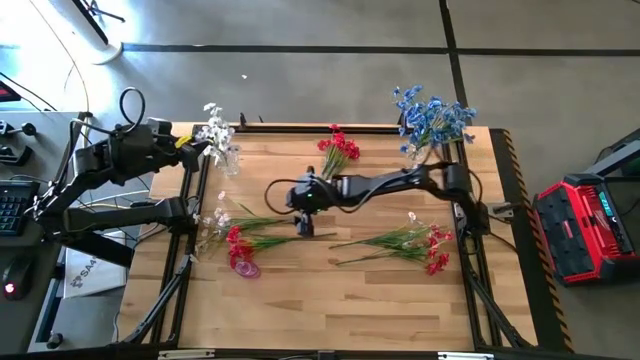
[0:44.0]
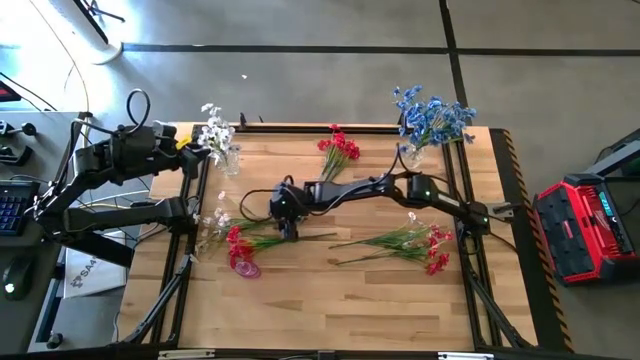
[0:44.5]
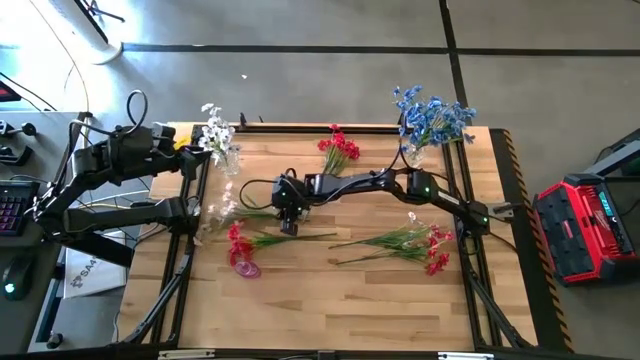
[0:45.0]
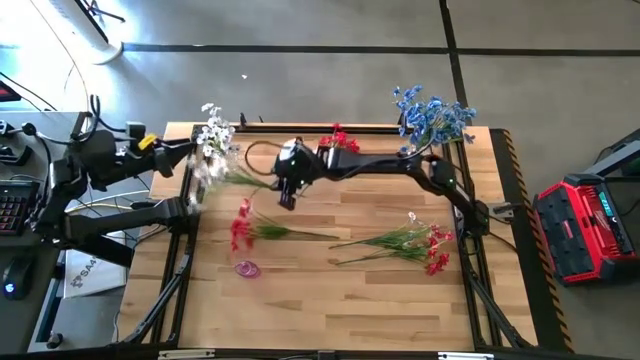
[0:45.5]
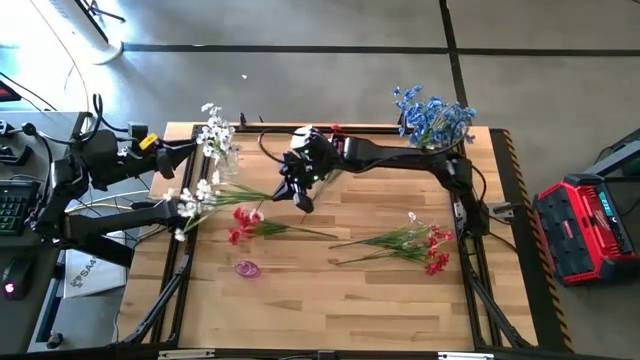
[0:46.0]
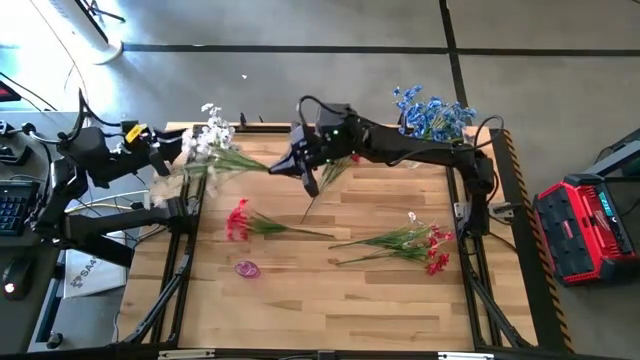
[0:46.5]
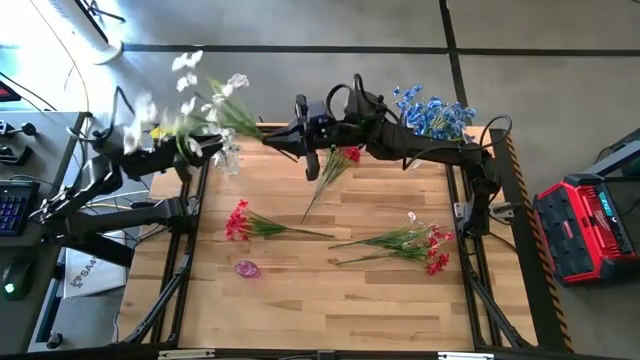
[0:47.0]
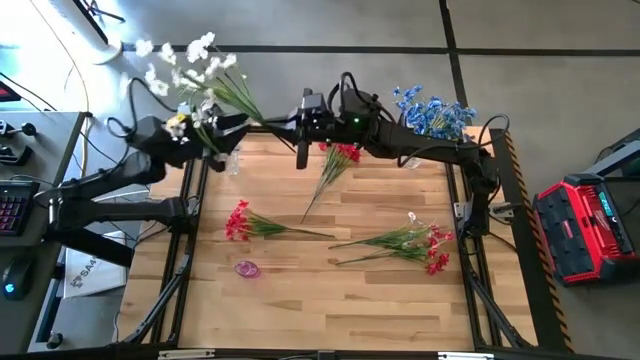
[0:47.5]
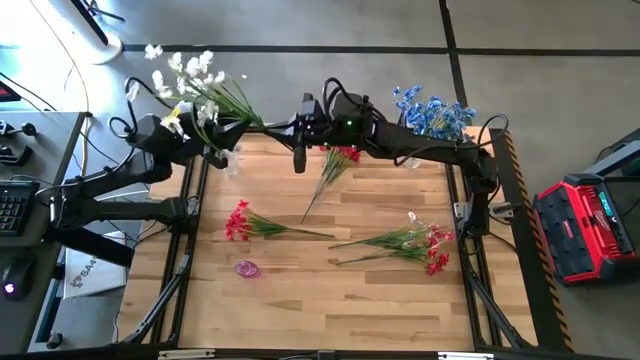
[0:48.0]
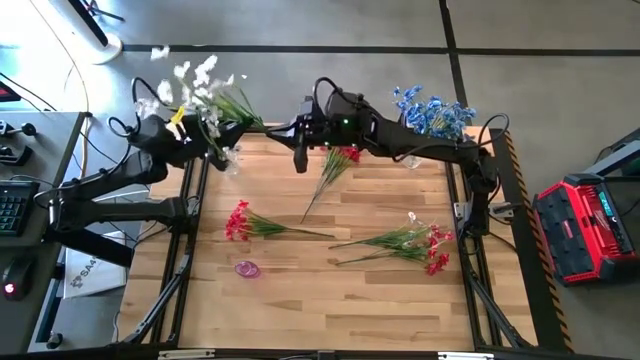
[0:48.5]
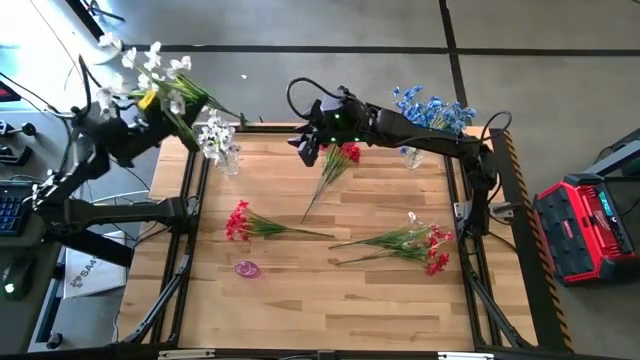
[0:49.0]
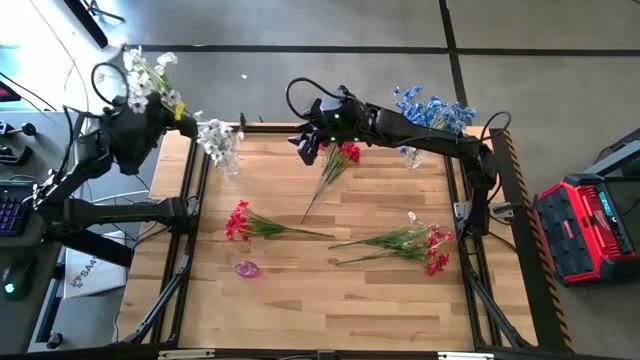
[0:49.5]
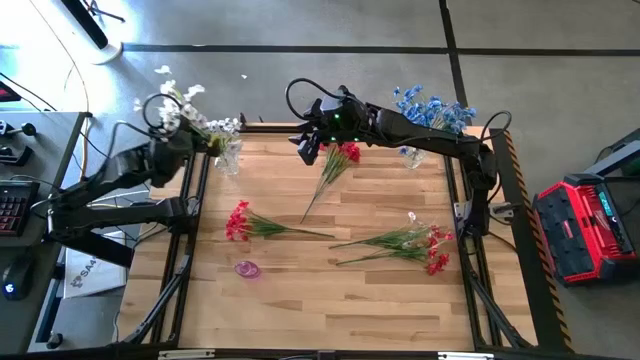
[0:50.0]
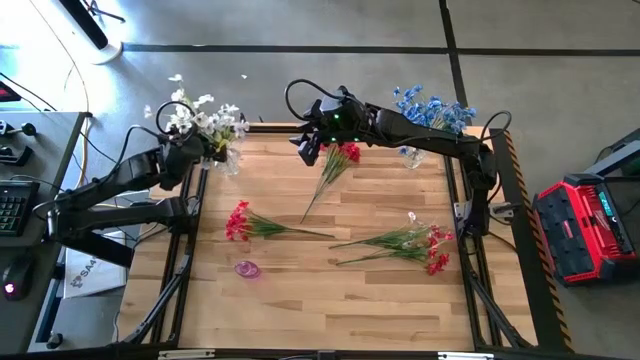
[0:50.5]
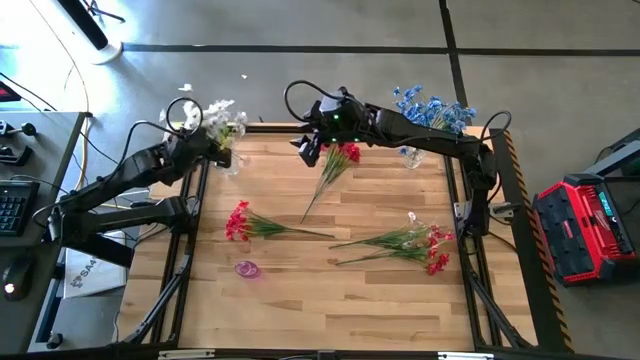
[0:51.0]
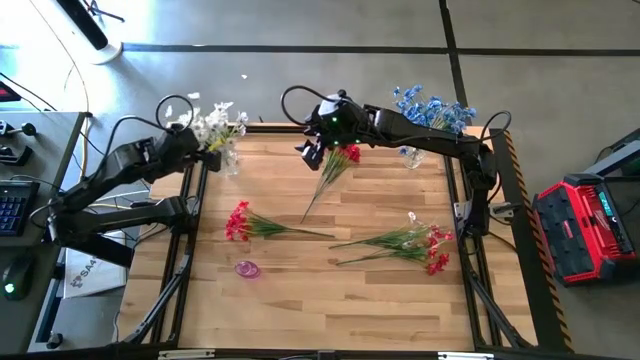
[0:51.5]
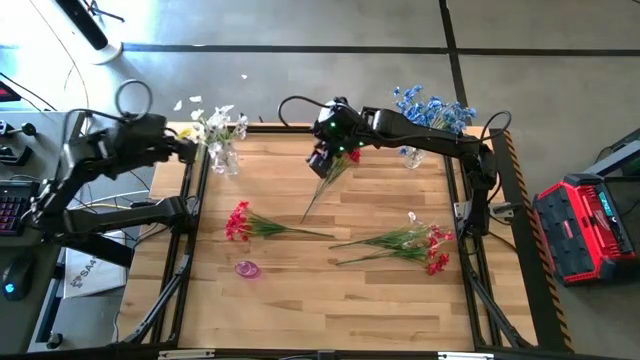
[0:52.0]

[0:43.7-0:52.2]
Task: Sort flowers into vase by color
Put the left white flowers into the left transparent vase

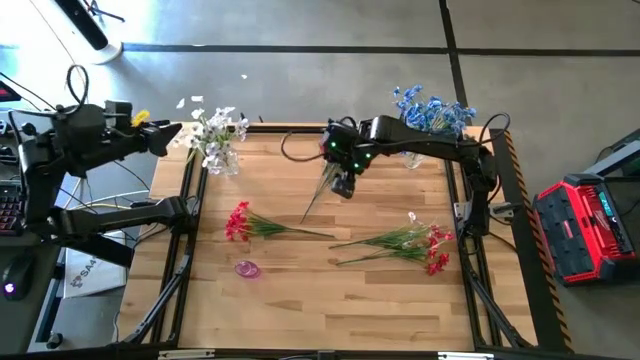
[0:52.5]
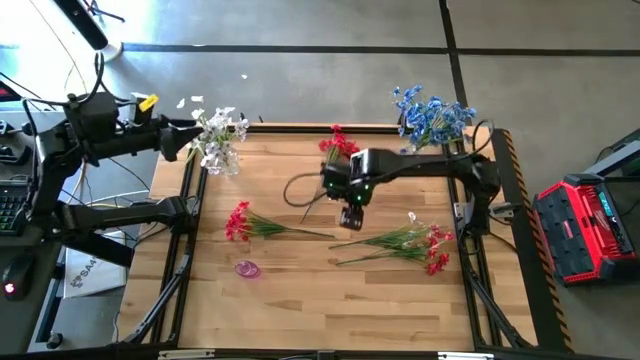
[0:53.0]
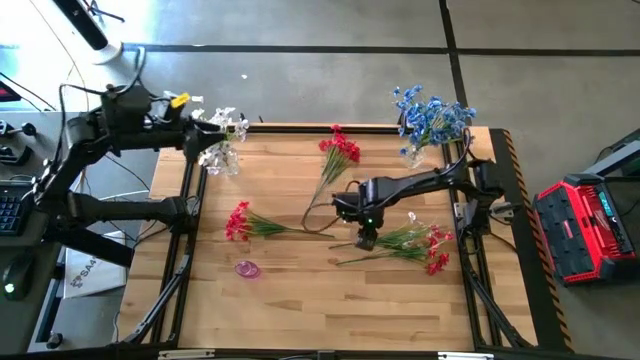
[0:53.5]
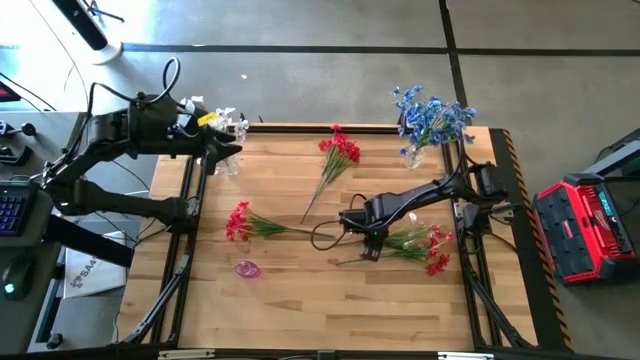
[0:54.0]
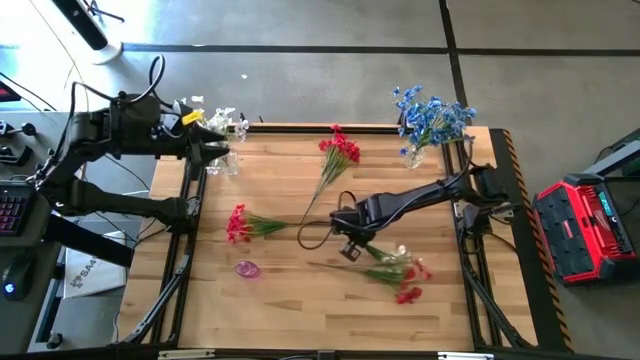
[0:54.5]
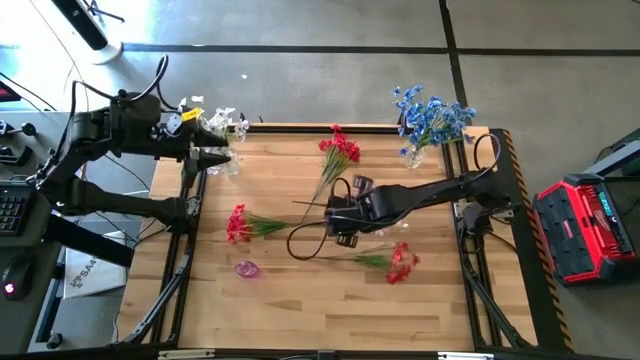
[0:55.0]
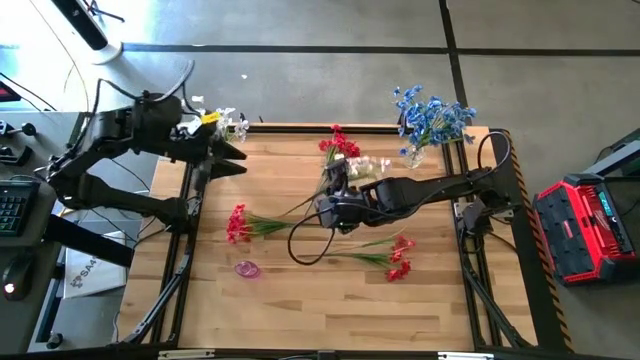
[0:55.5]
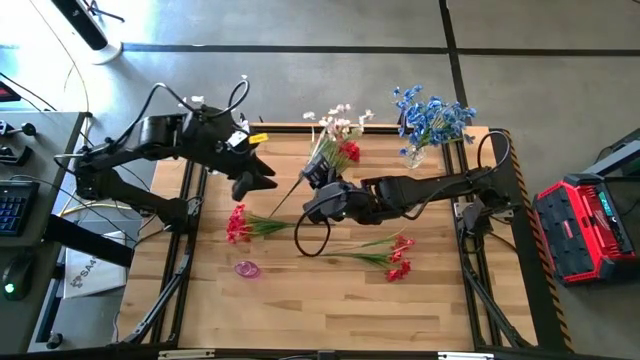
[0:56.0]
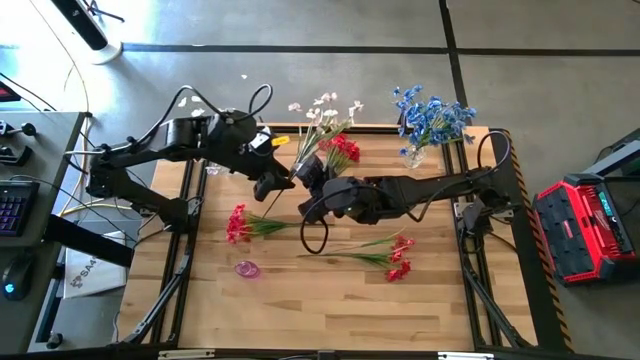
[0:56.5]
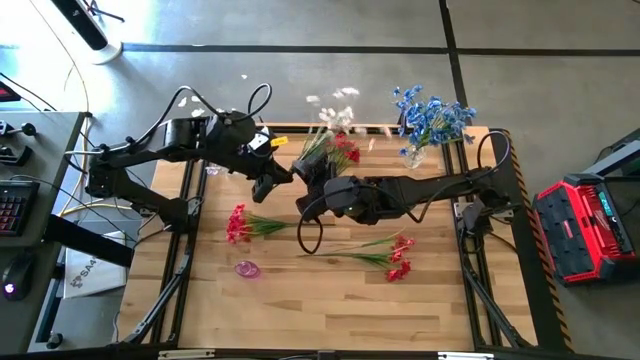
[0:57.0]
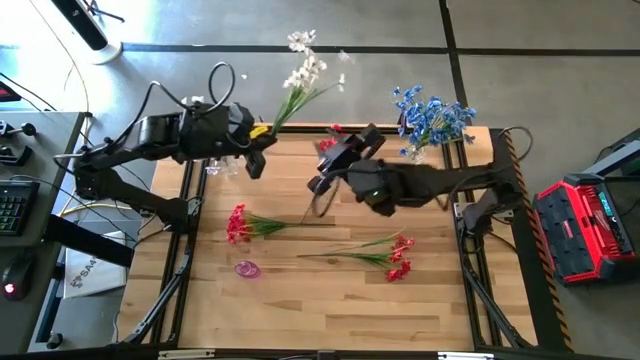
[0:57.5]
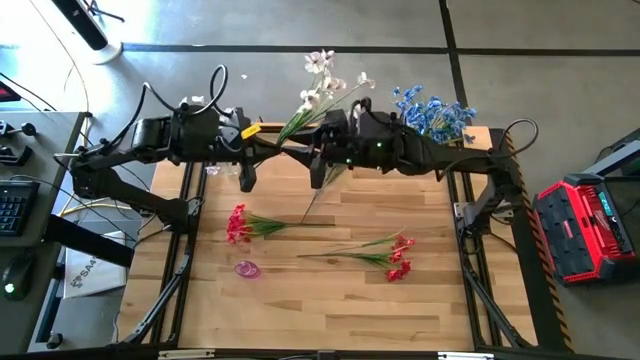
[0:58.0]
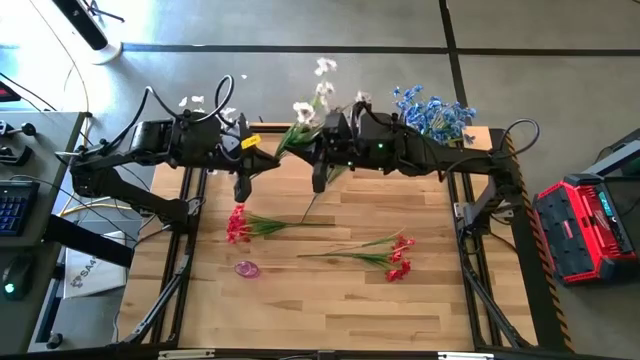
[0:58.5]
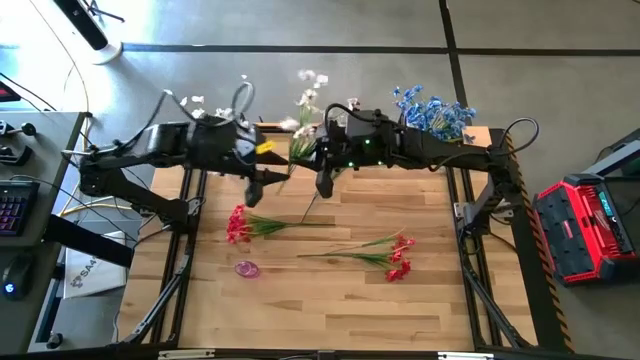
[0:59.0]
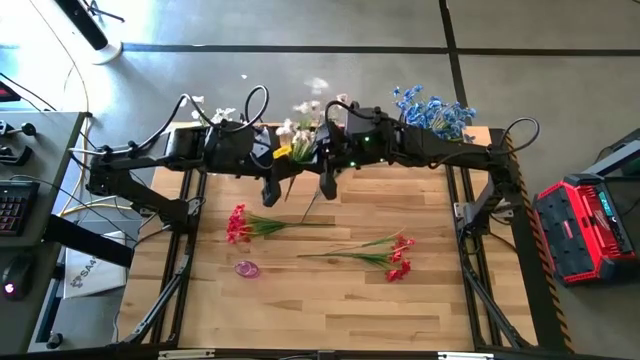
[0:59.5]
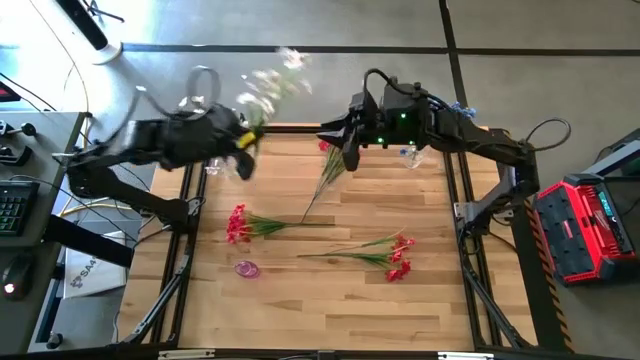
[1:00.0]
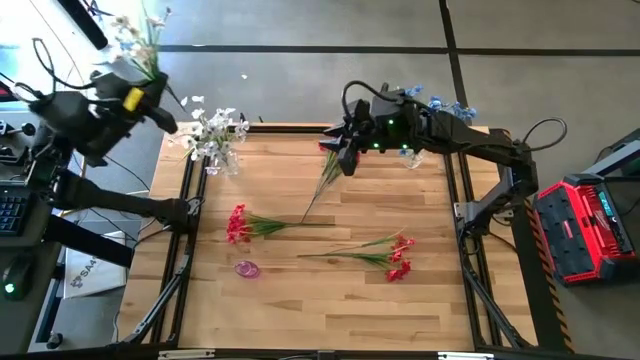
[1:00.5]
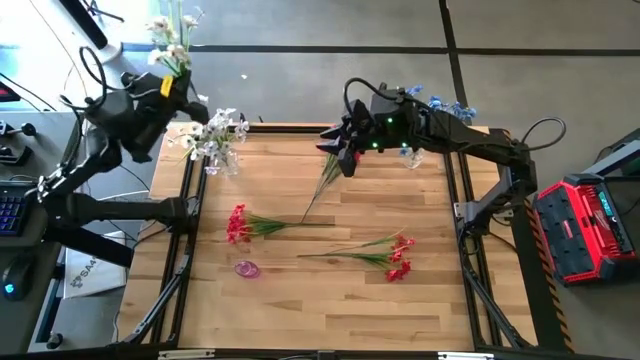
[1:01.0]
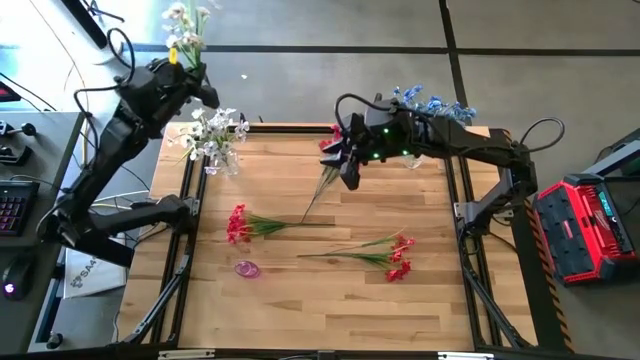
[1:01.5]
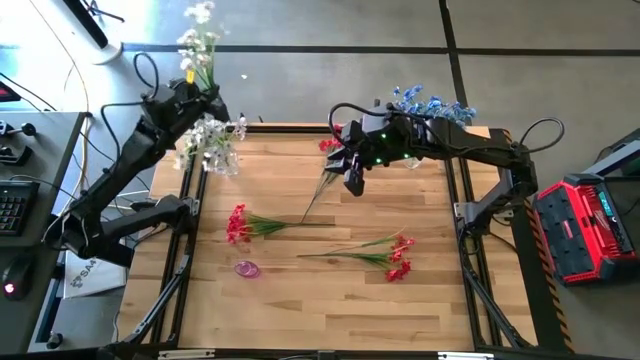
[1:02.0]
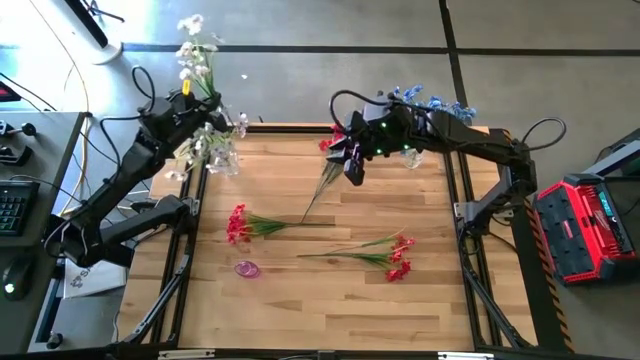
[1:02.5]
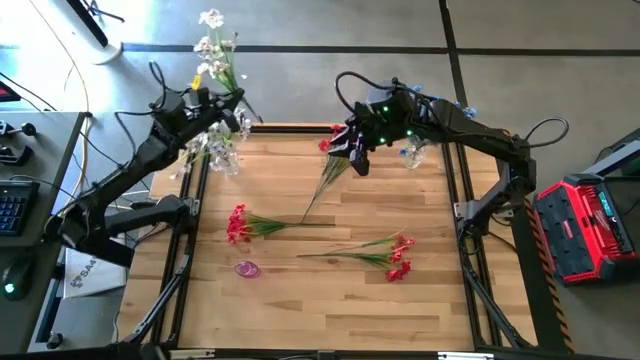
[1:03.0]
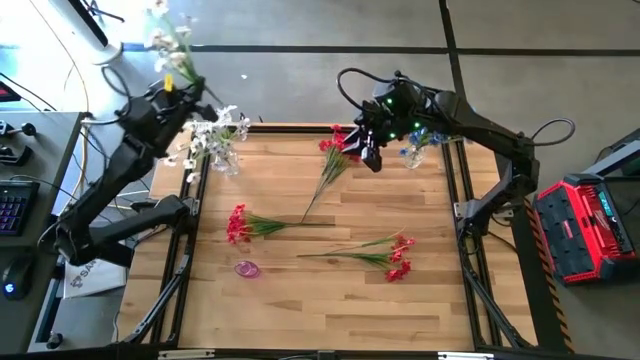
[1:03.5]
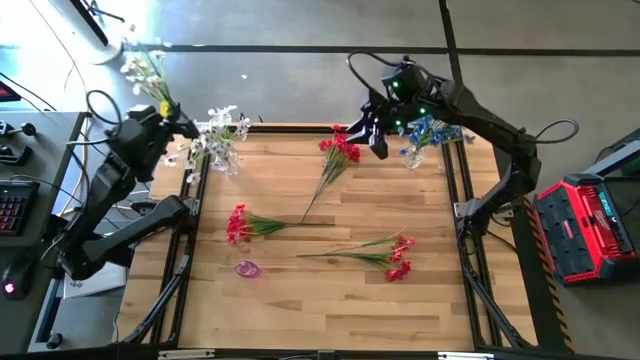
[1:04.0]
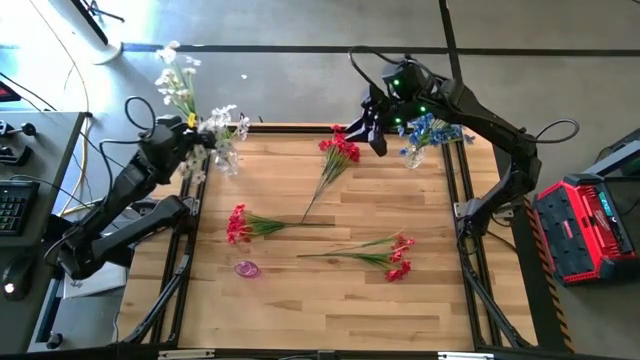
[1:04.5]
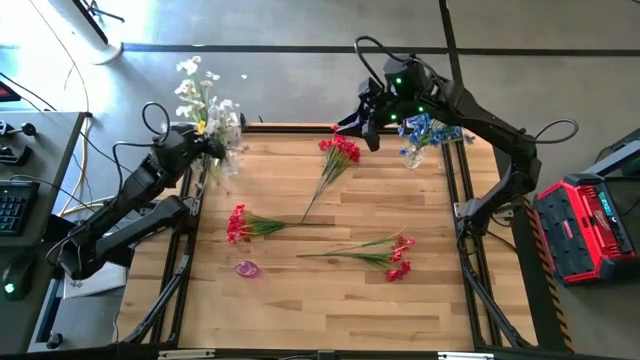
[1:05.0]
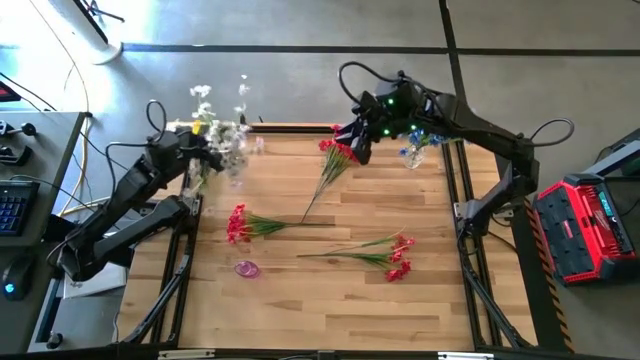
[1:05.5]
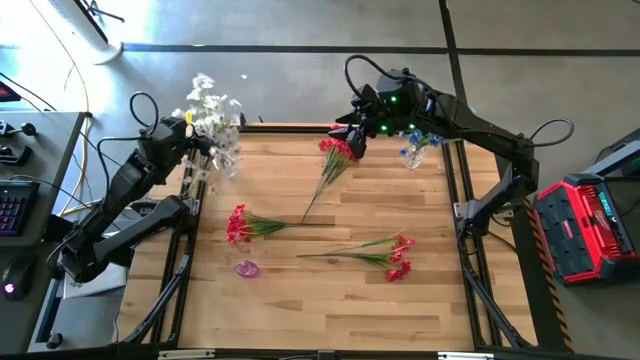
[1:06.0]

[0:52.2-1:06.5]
Put the white flowers into the left transparent vase
